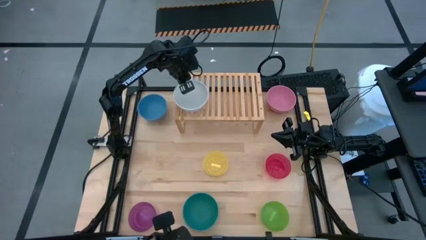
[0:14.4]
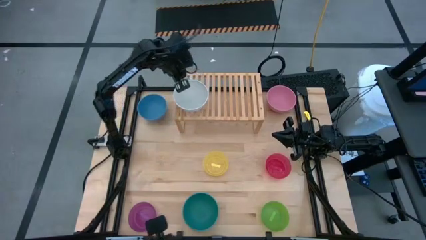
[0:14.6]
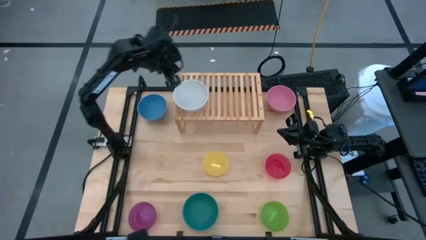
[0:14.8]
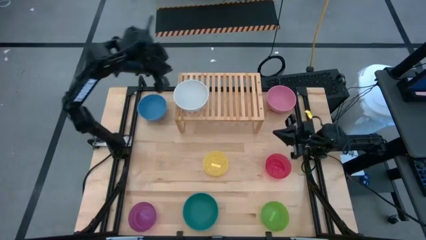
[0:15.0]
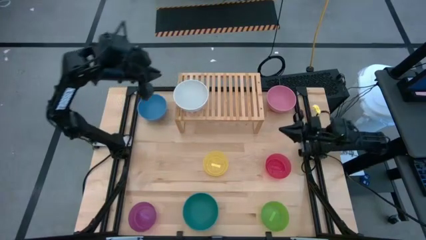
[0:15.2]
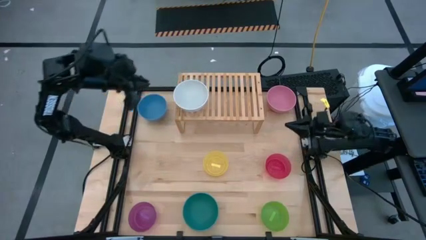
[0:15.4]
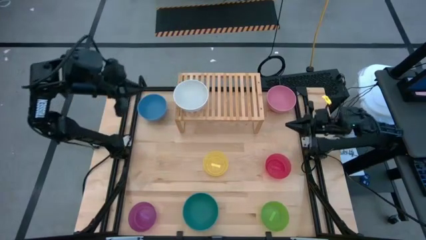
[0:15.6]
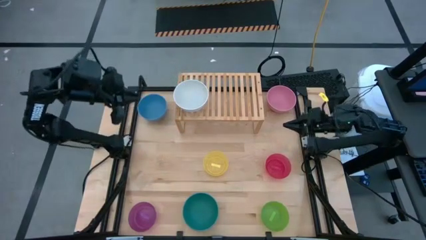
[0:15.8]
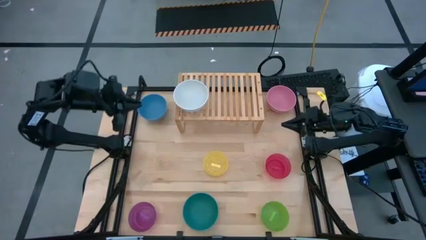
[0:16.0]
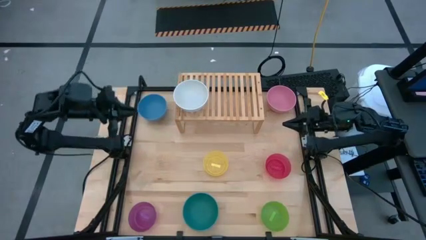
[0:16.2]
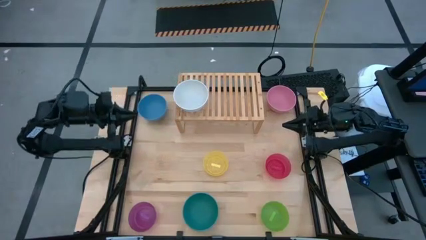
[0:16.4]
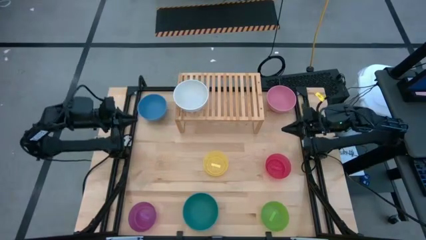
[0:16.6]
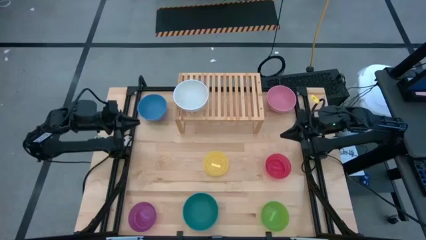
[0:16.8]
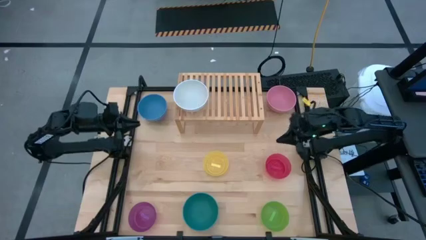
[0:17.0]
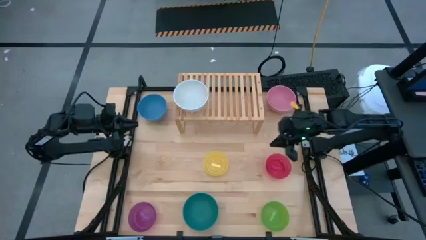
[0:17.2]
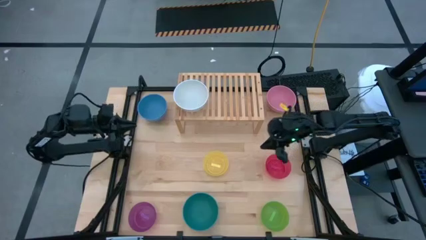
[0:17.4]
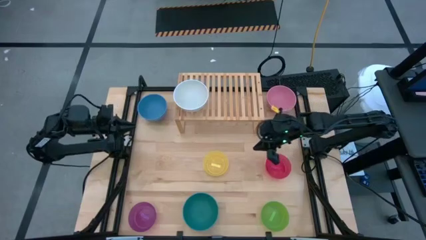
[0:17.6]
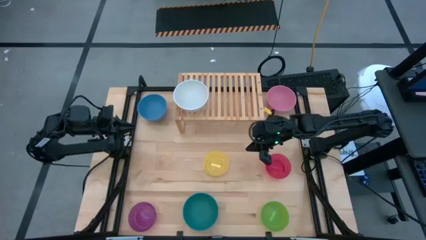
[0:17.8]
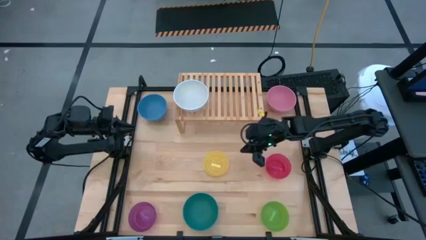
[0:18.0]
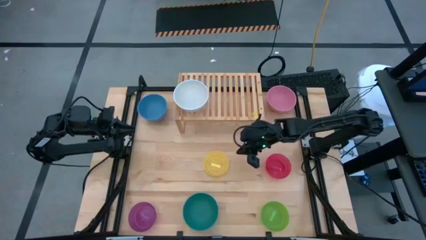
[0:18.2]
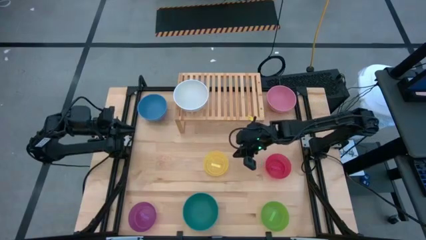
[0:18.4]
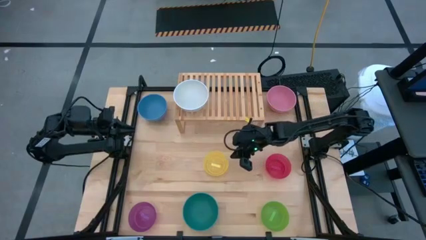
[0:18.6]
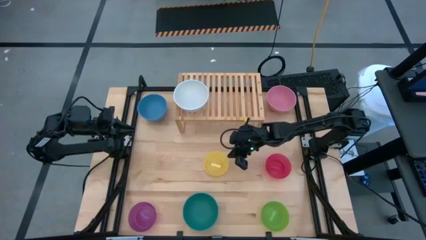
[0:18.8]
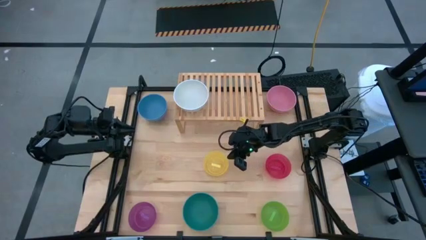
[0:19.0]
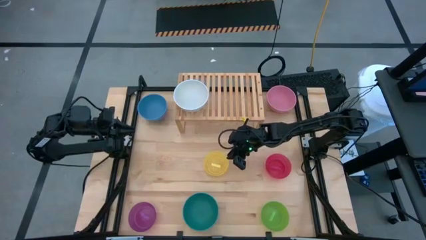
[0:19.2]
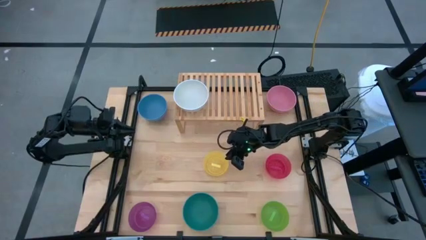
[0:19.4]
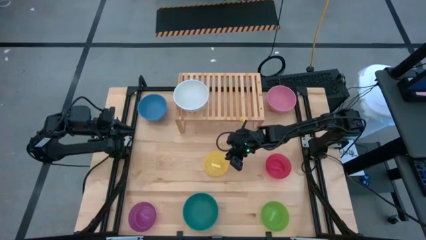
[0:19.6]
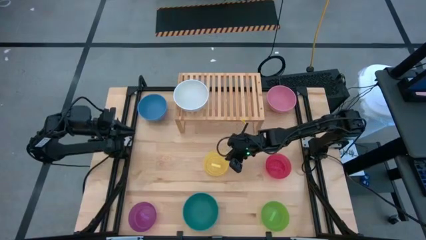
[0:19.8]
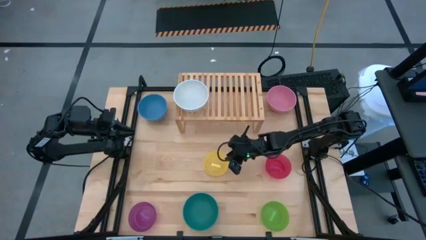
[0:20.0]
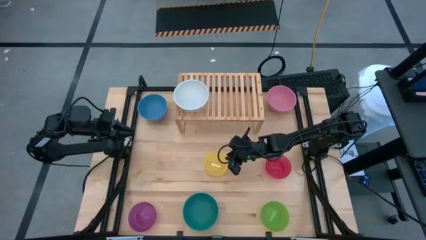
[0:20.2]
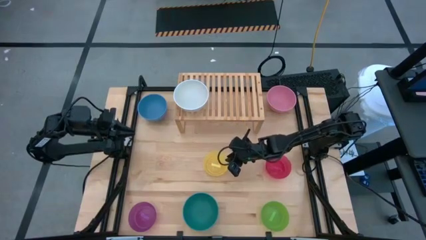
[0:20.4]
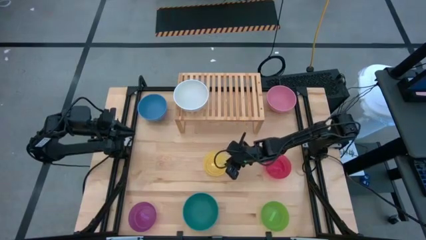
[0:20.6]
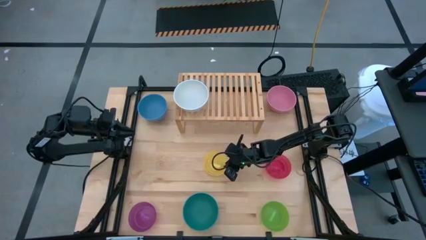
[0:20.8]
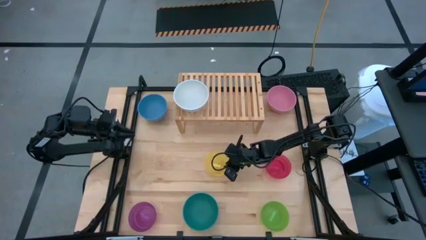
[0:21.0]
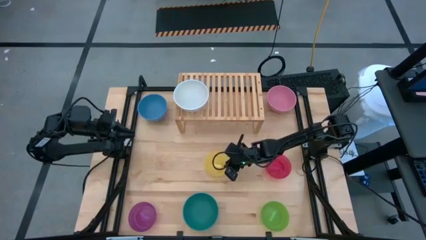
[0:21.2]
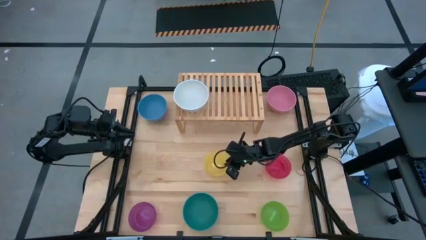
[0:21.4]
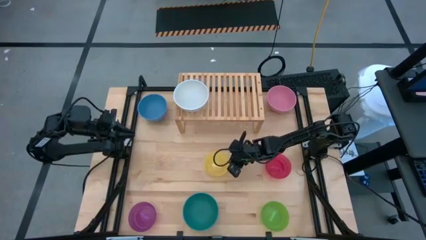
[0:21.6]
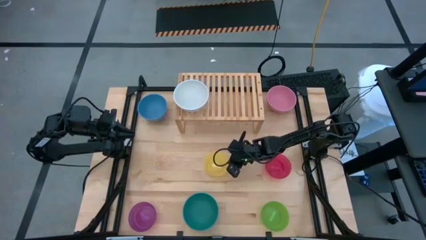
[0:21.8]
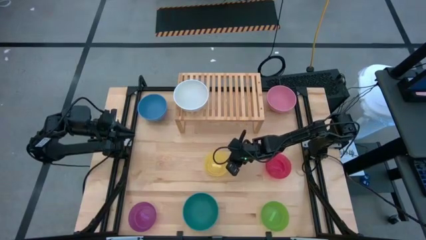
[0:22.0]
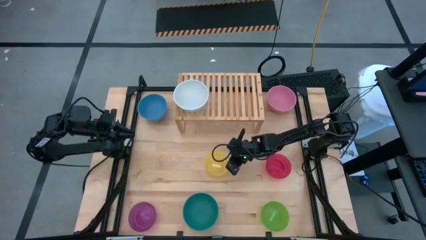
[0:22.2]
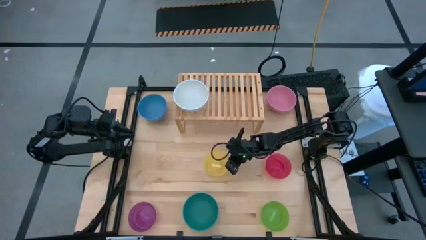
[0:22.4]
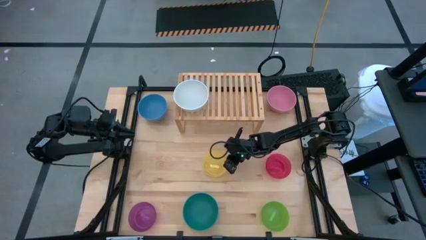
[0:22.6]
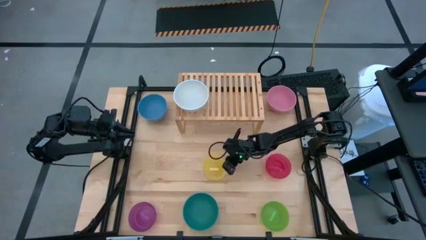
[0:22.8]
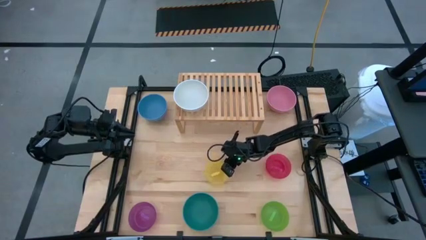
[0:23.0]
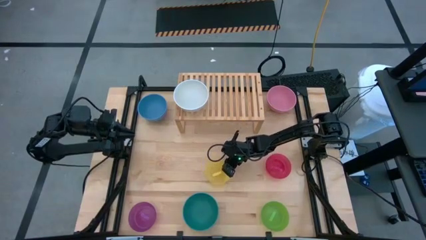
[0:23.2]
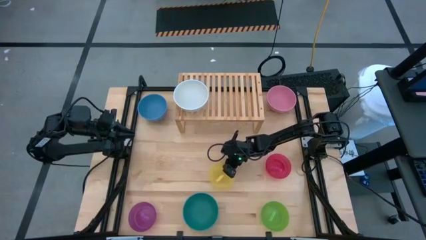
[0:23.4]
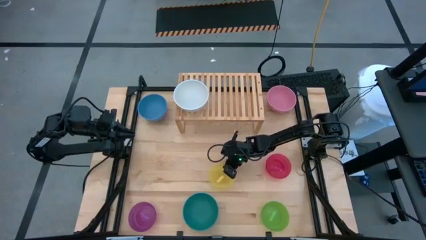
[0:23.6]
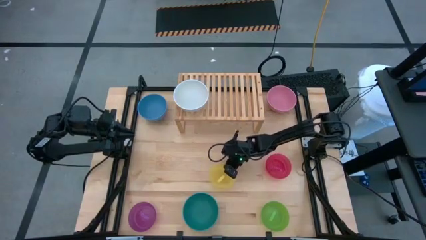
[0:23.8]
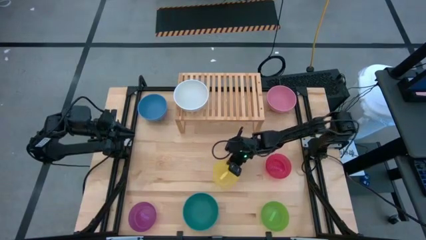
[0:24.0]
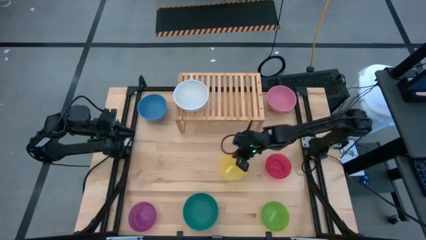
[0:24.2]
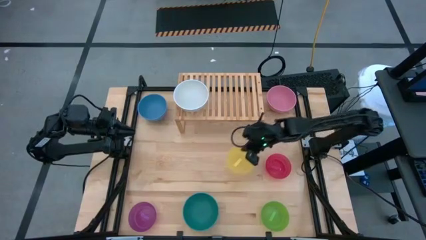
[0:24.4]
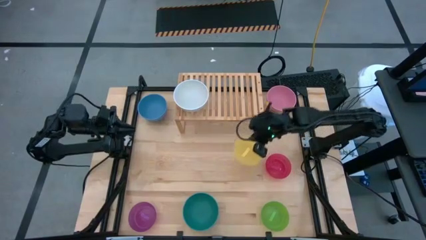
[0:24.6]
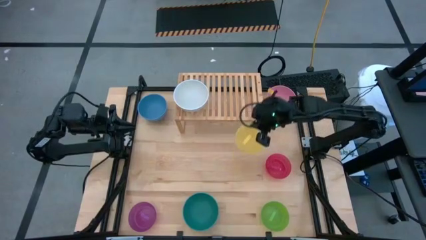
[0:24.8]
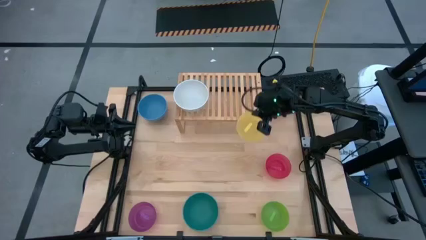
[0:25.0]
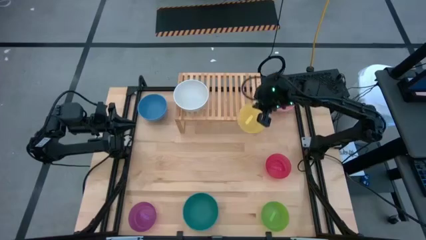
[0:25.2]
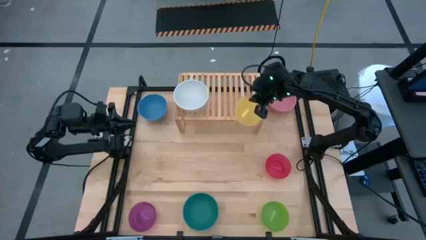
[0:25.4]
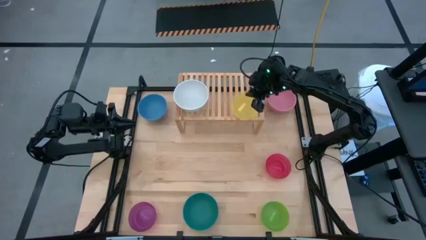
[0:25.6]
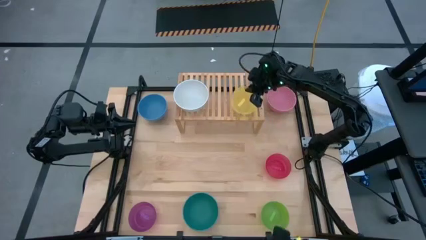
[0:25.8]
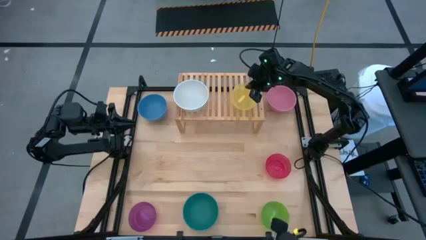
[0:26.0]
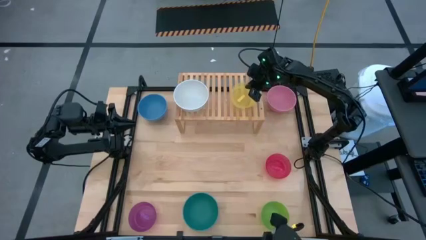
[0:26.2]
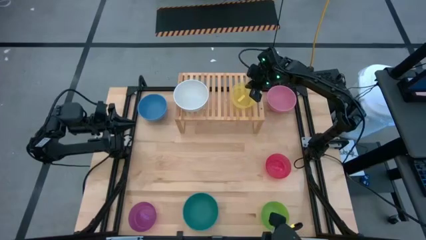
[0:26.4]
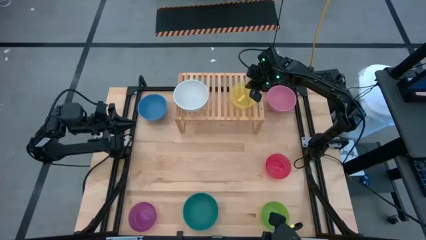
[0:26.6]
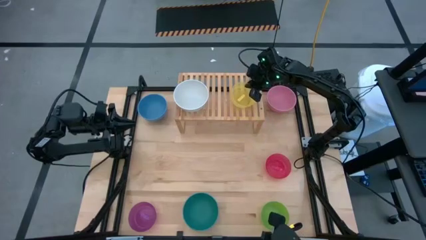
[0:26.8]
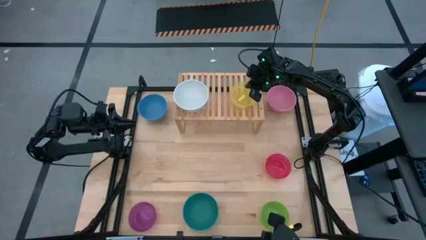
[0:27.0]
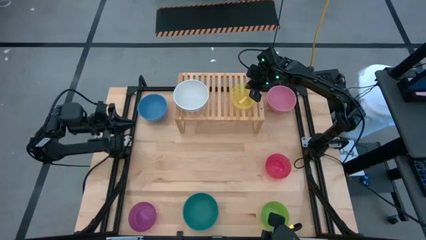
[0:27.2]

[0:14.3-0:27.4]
Task: Place and stack bowls onto a shelf
Put the yellow bowl on the shelf
